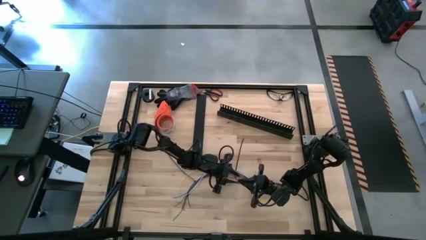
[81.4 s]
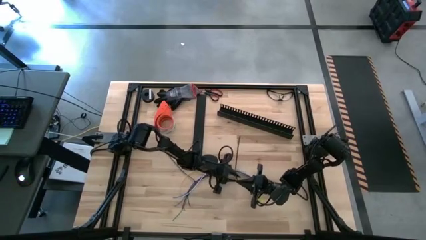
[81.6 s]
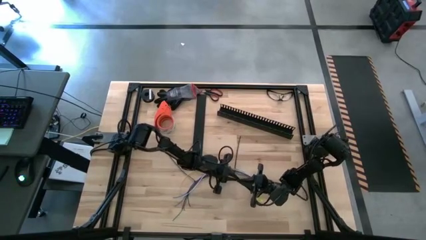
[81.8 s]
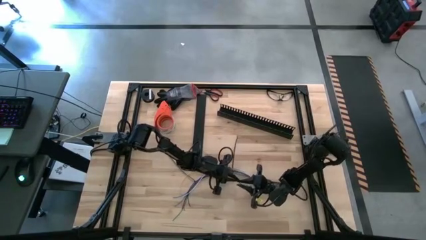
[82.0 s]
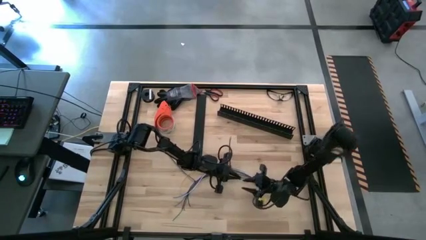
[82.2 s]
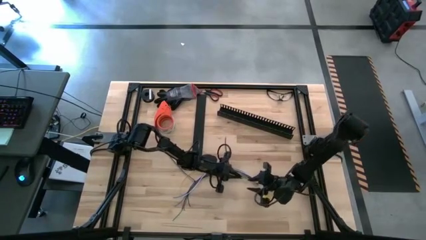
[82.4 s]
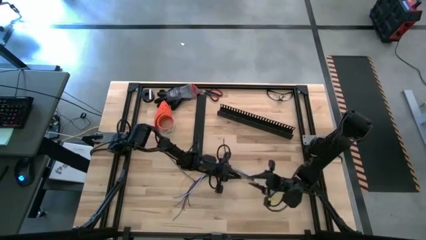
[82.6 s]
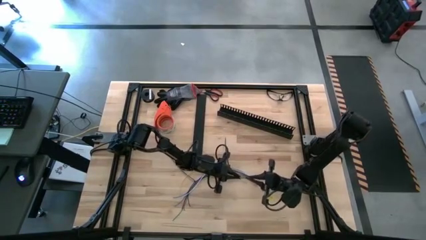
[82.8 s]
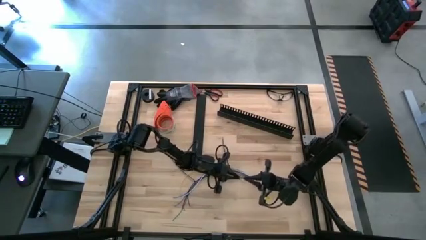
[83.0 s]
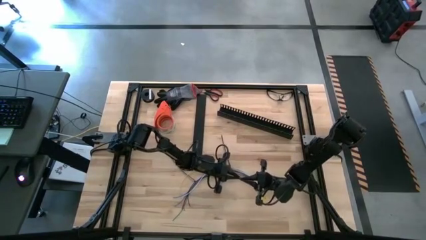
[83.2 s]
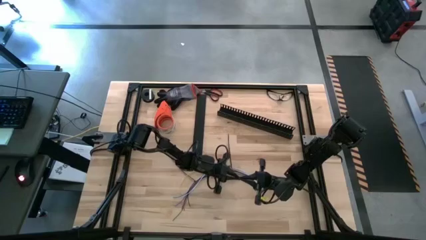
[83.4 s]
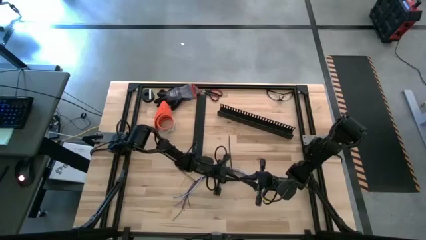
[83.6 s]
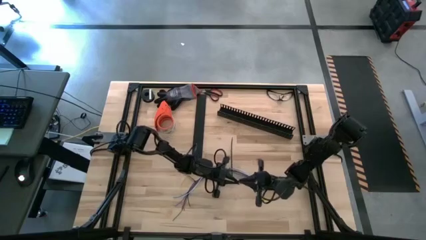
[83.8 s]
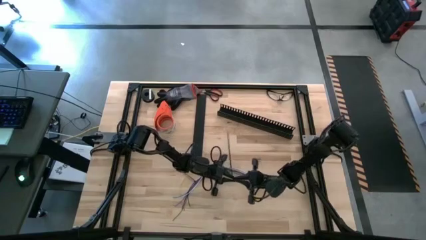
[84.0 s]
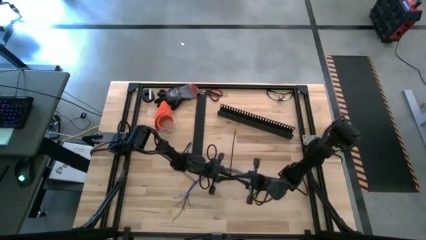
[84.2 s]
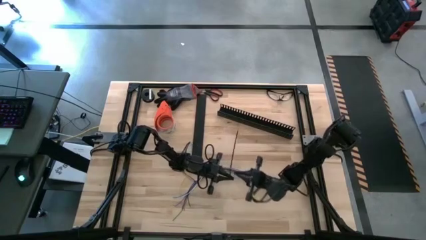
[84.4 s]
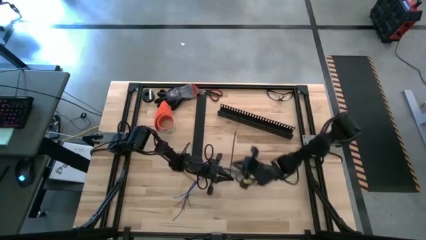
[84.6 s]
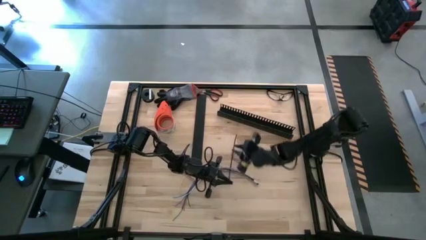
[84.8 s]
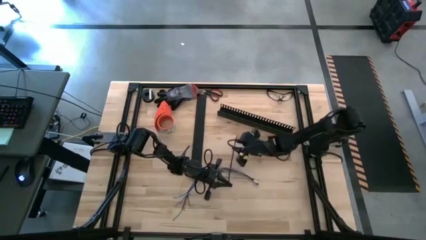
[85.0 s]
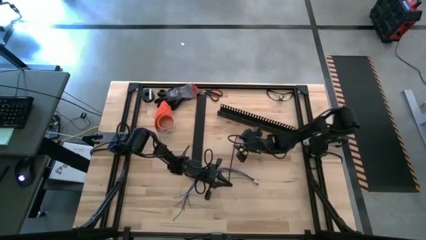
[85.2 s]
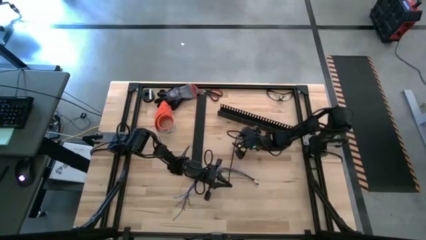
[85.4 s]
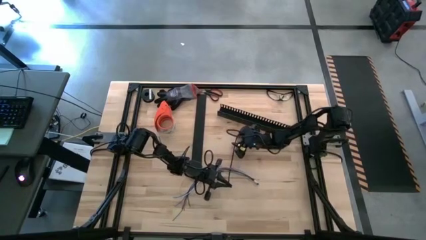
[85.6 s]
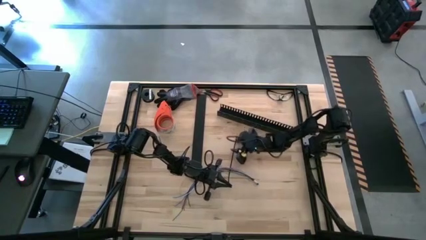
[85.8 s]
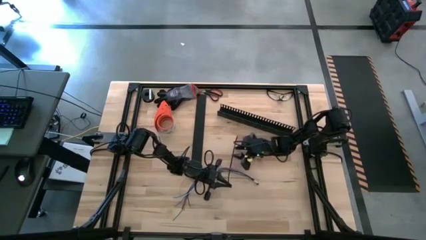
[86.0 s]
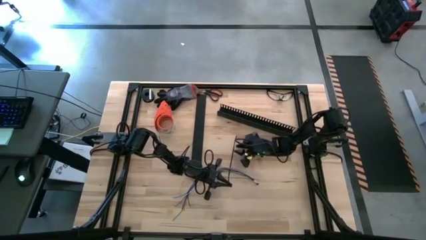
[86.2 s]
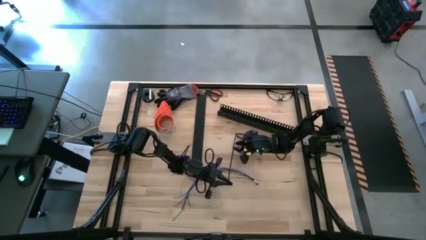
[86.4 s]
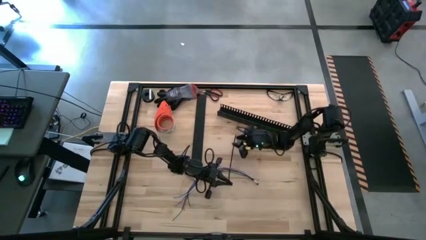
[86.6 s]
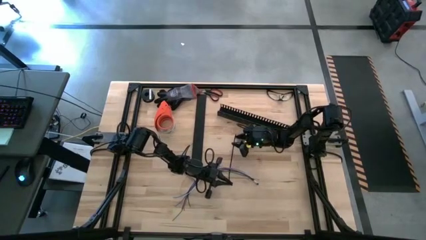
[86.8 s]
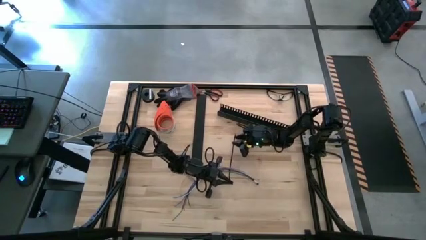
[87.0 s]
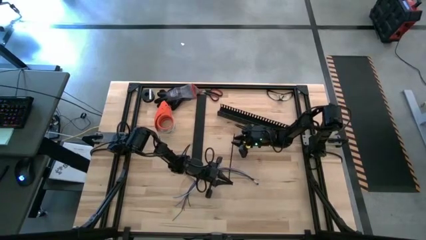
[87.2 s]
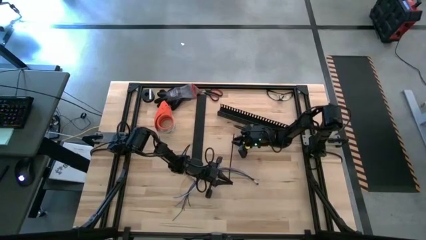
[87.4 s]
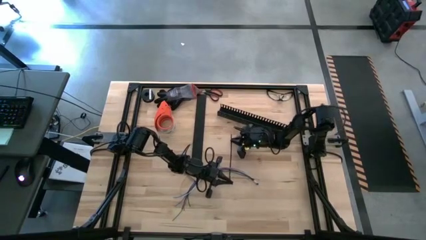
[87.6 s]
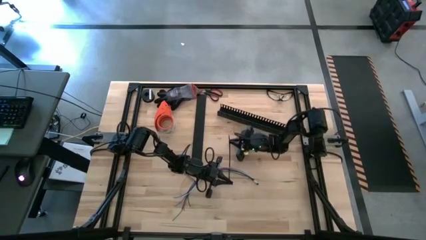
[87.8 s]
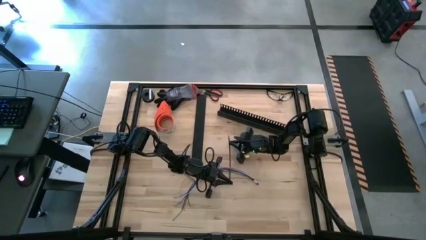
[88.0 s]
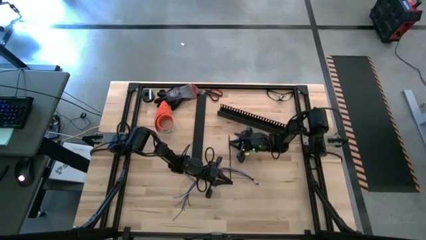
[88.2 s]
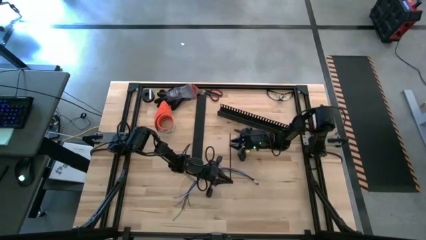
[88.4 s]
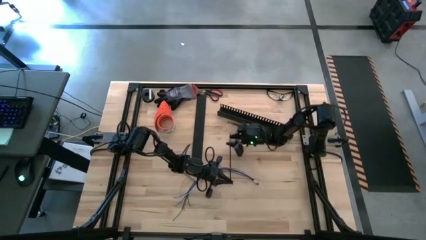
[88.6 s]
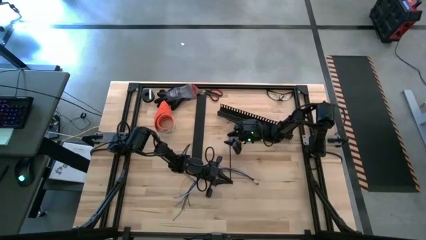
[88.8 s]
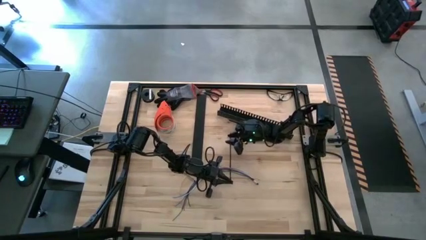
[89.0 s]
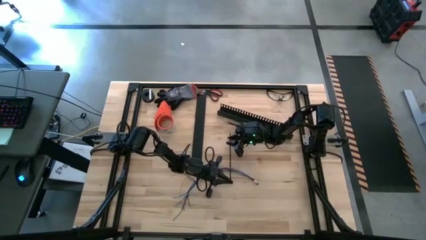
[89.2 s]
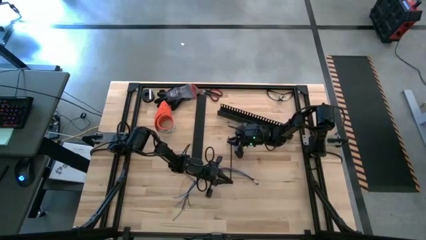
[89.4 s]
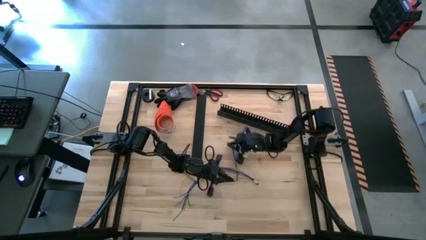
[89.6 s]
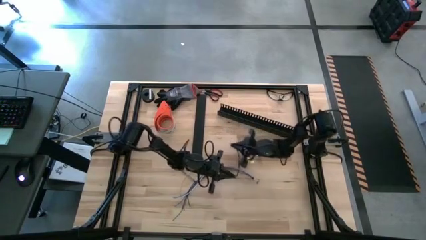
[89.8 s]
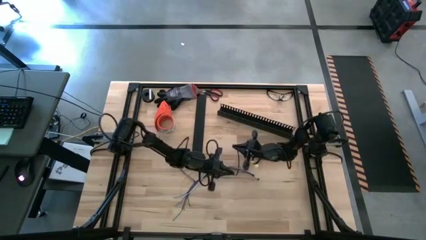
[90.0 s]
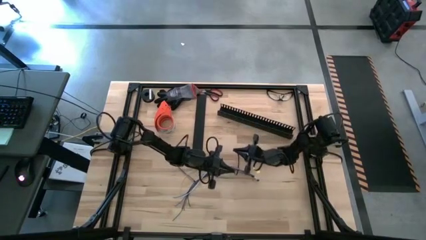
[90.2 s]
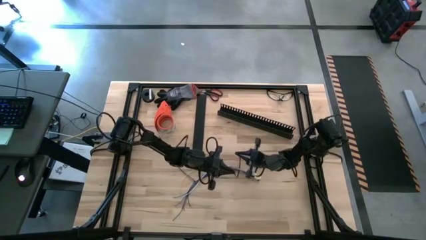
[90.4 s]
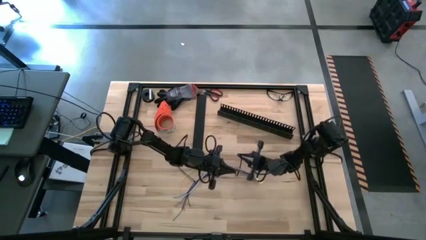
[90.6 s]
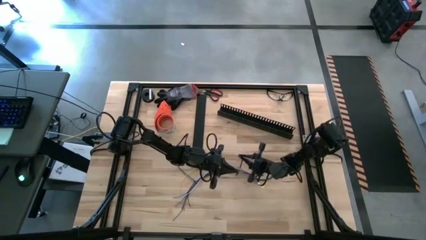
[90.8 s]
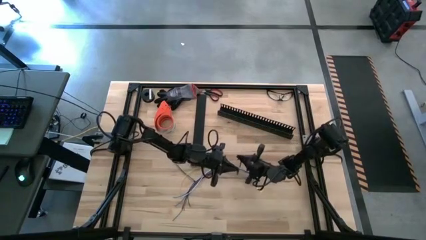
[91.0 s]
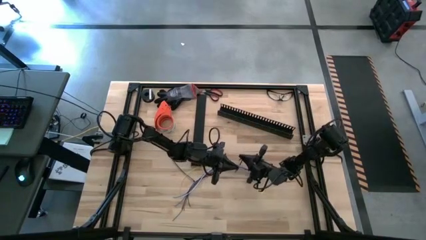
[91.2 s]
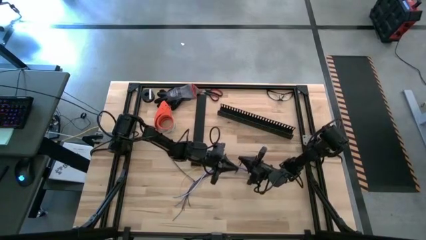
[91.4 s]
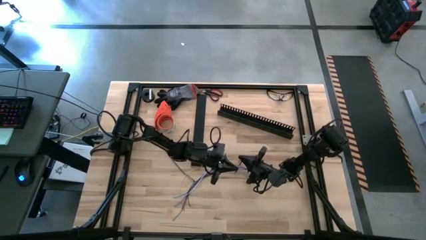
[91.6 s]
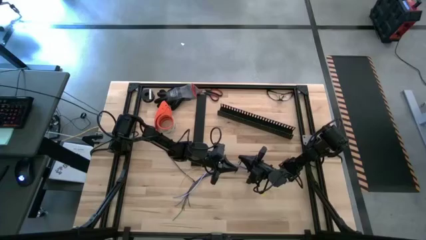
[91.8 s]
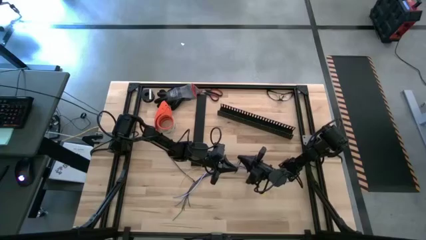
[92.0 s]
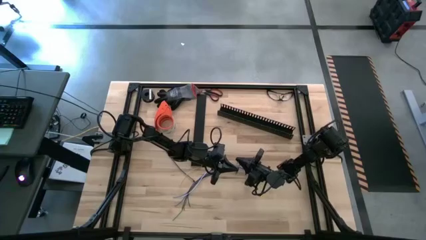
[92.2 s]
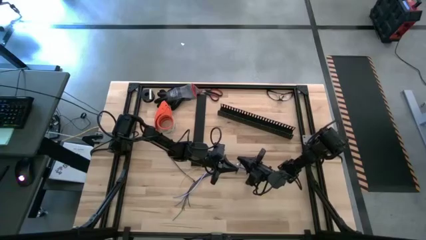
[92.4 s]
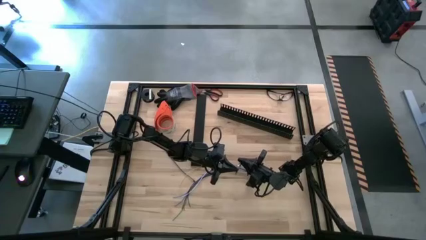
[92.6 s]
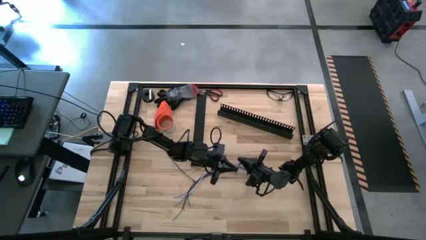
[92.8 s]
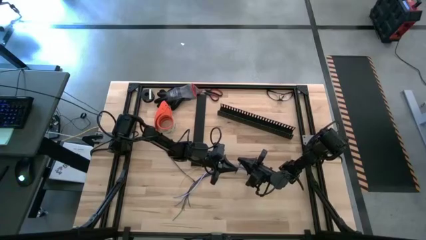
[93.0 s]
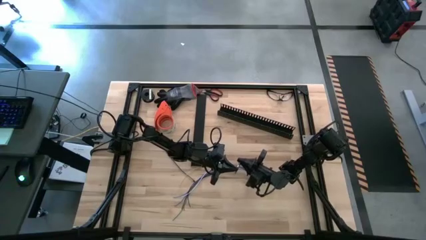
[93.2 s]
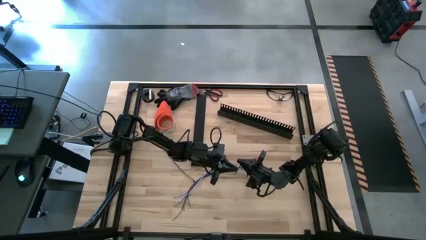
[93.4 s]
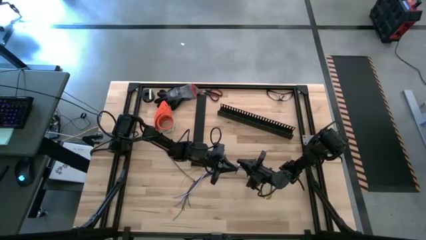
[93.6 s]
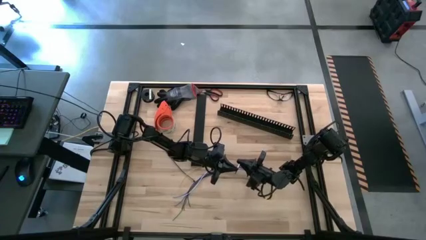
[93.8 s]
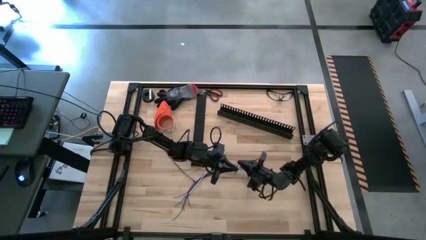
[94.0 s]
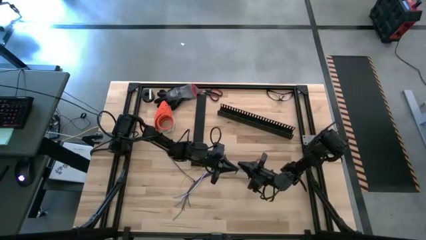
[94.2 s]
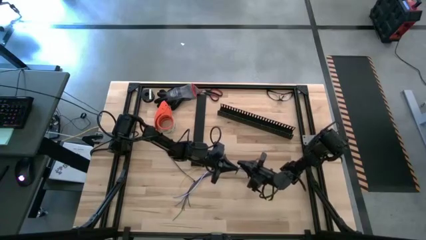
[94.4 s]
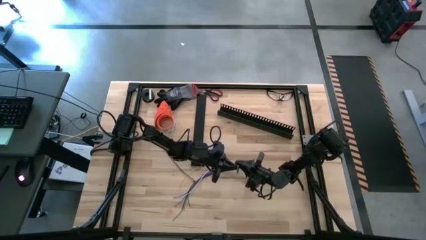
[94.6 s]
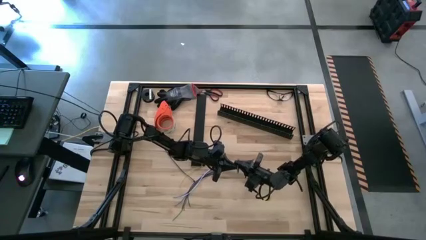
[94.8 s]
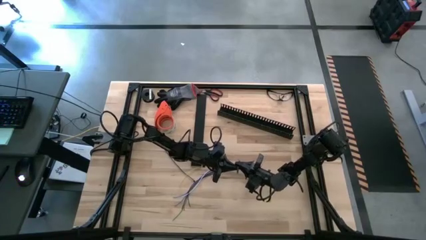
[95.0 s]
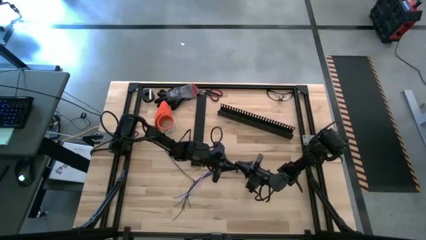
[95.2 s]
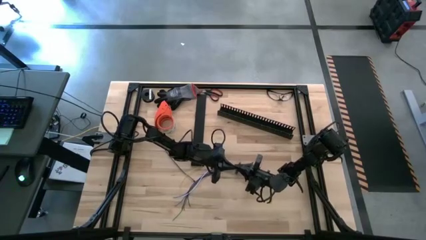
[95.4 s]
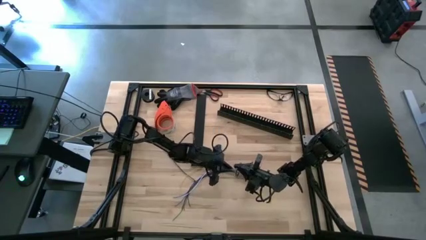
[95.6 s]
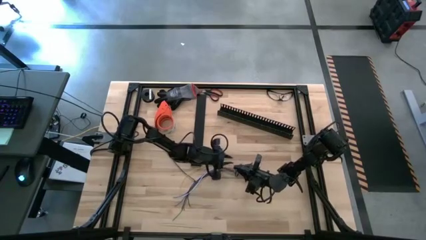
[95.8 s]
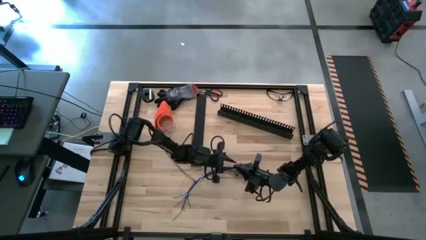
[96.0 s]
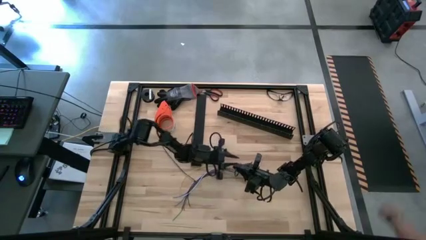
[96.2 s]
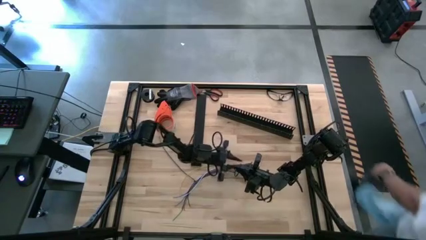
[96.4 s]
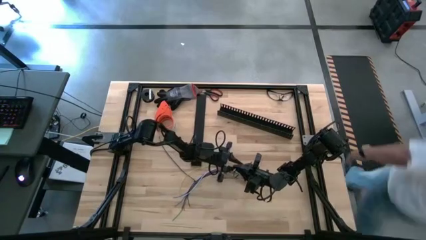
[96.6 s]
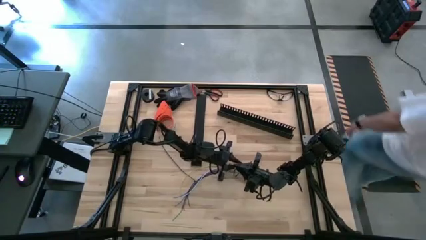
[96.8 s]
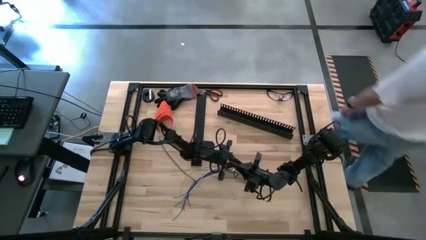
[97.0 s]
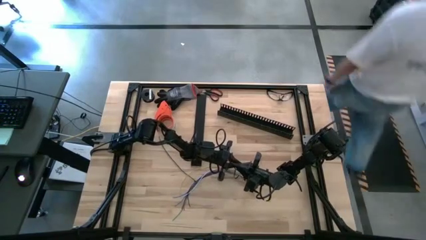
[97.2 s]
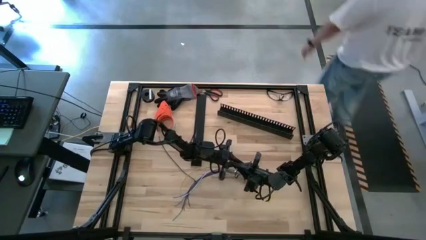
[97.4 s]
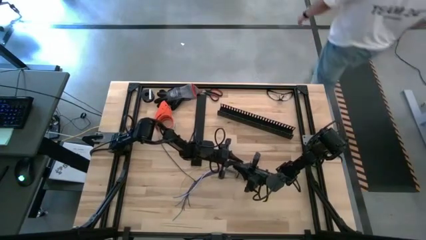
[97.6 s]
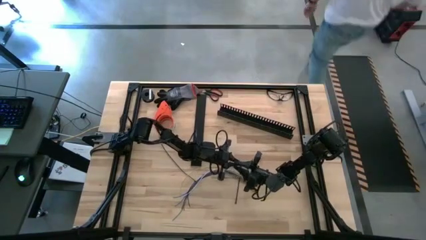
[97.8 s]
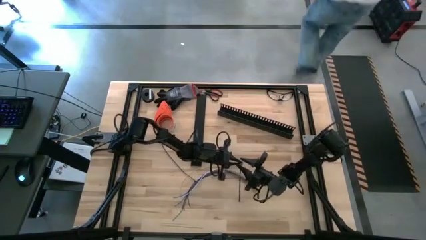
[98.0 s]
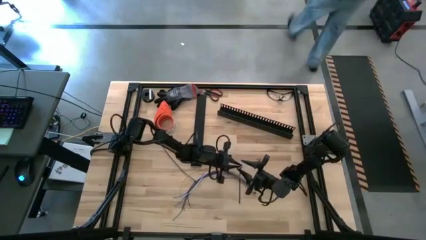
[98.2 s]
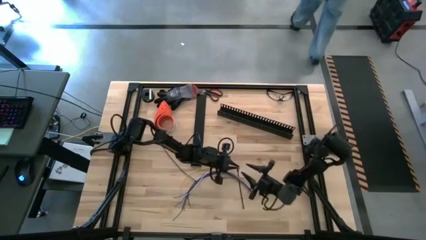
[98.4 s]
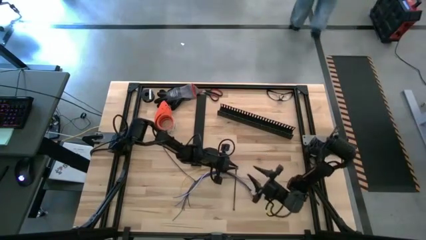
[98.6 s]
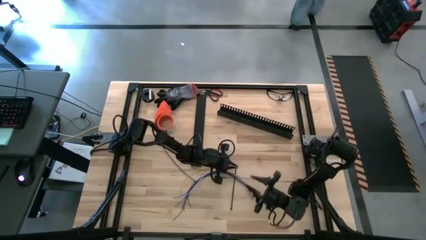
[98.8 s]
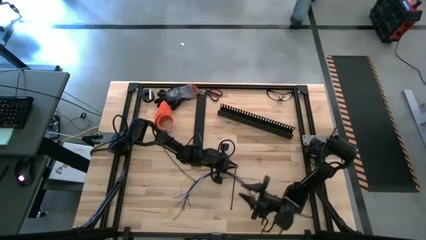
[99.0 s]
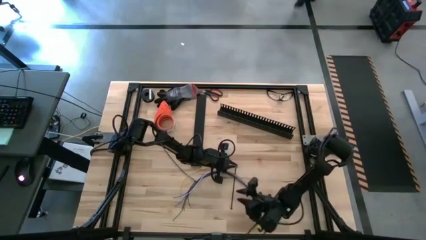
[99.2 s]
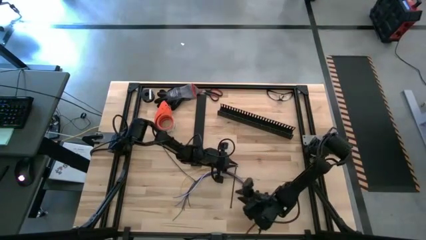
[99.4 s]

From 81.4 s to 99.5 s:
Task: Ziptie cables
Wrap the black zip tie on the cables
